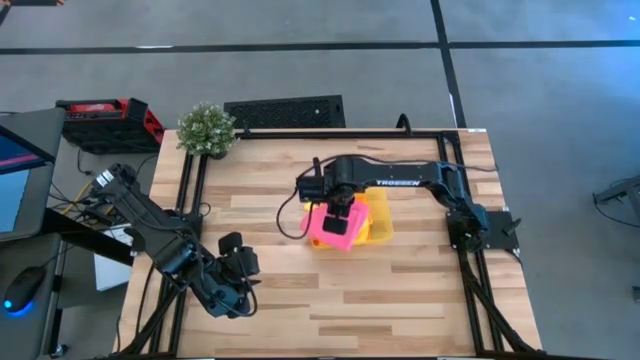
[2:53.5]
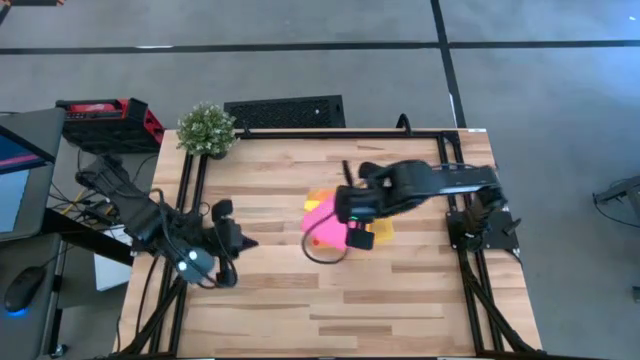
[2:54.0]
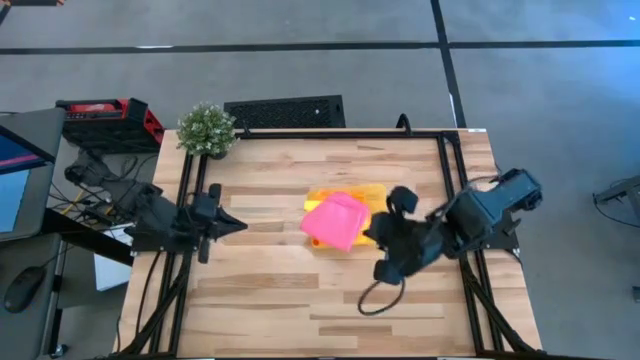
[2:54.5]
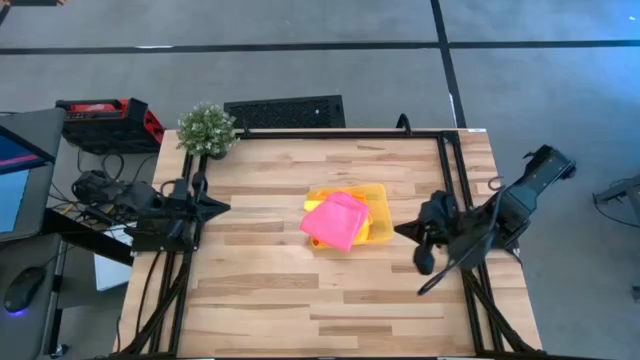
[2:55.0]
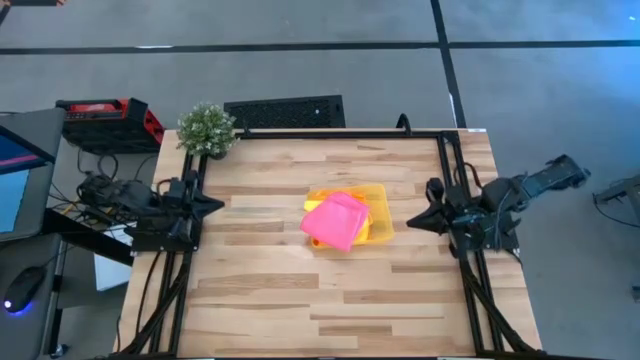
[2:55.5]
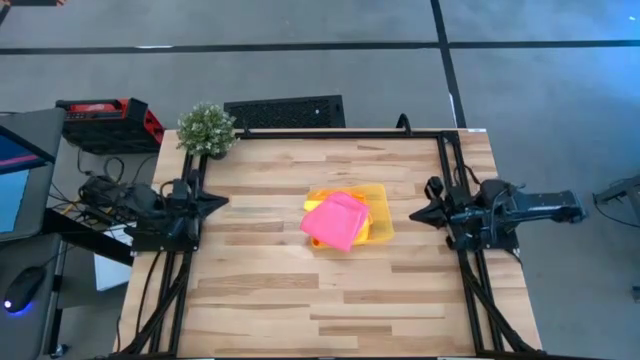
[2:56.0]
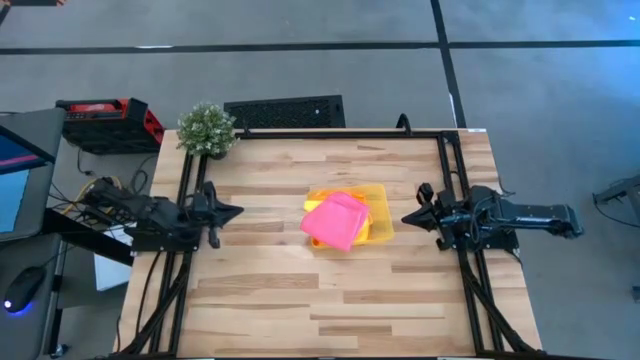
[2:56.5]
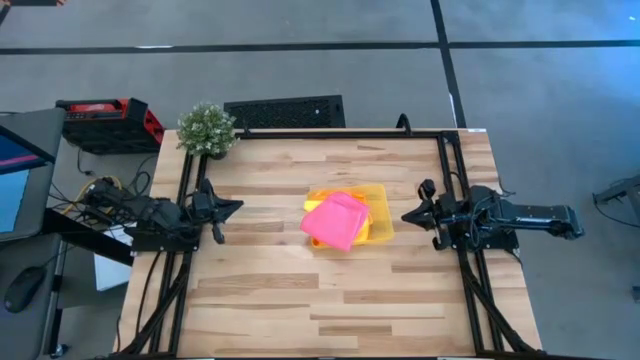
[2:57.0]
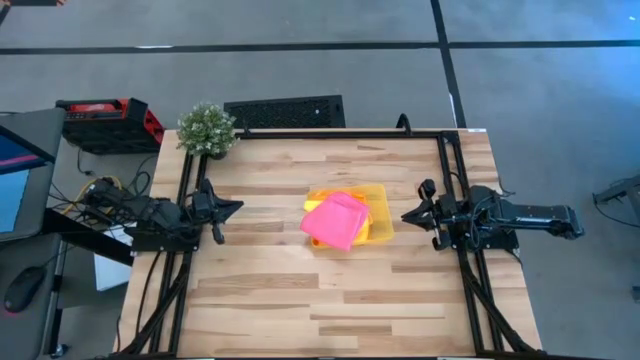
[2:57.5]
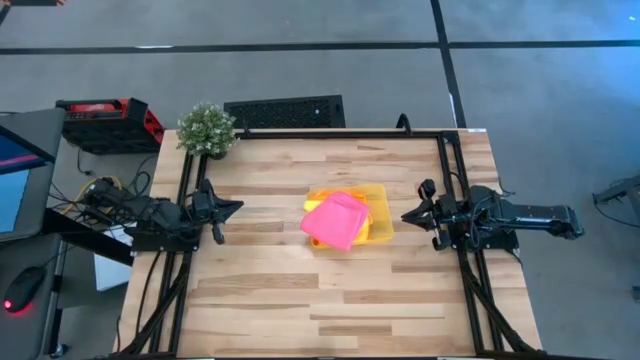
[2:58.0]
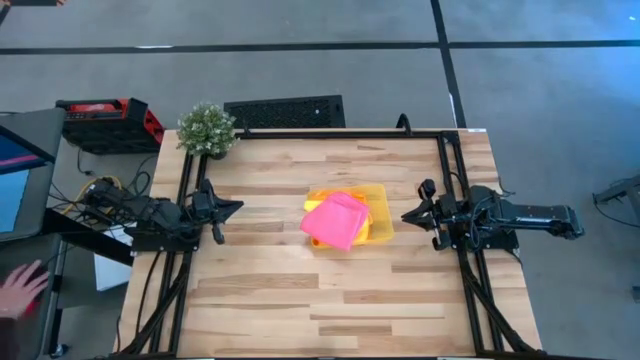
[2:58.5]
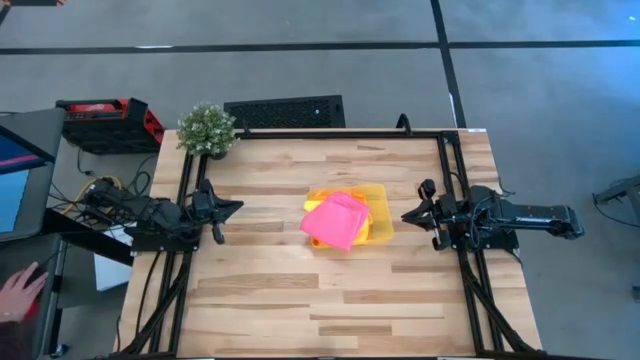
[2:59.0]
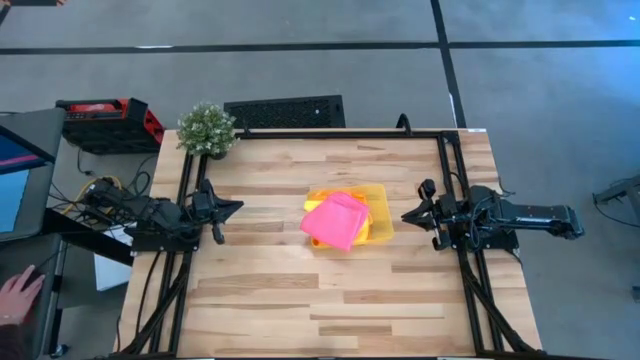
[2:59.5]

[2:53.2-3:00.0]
Task: Fold microfiber towels
Return to Home Position

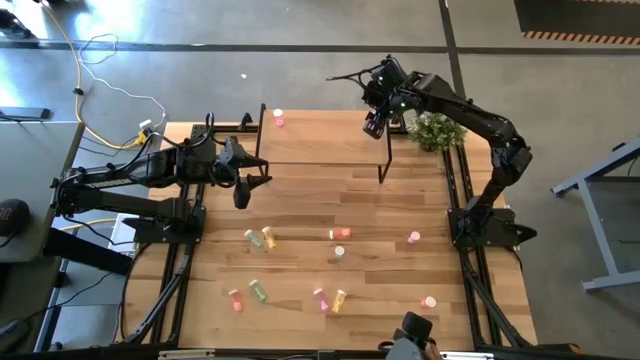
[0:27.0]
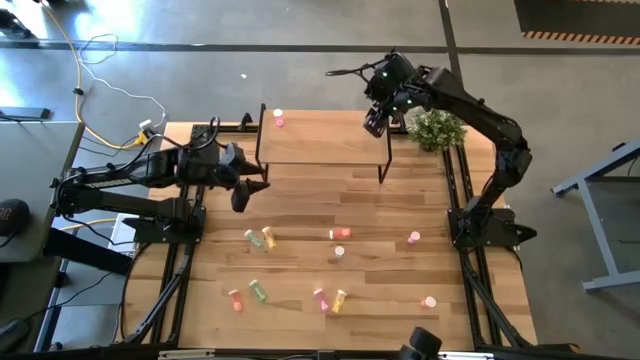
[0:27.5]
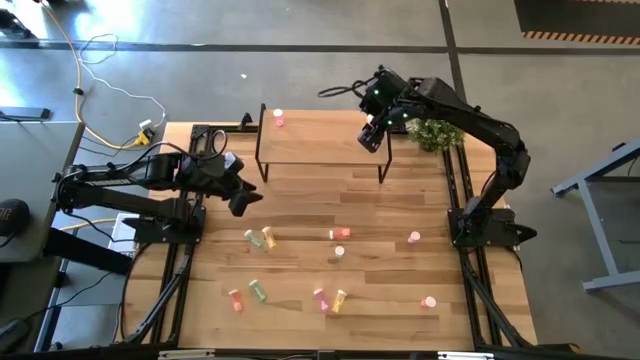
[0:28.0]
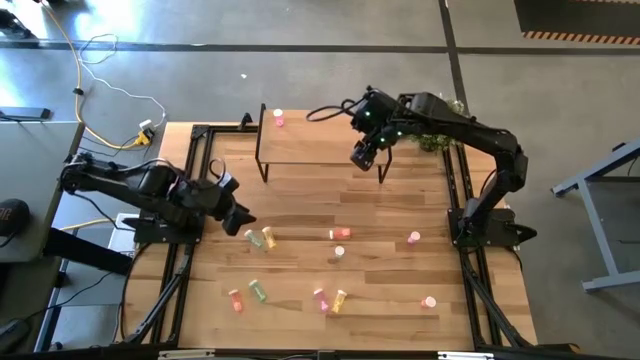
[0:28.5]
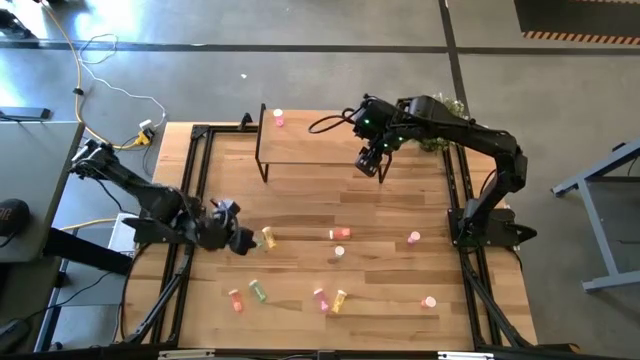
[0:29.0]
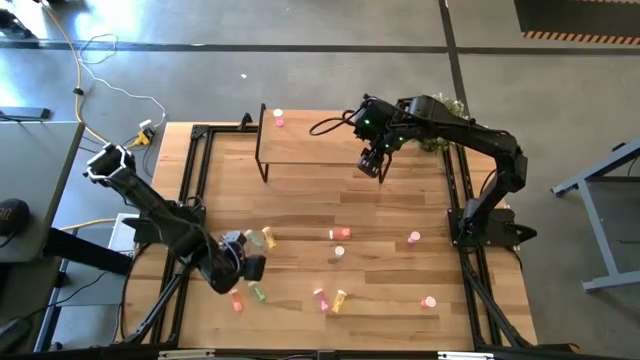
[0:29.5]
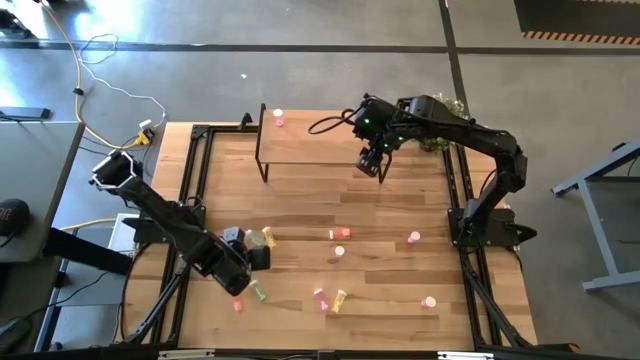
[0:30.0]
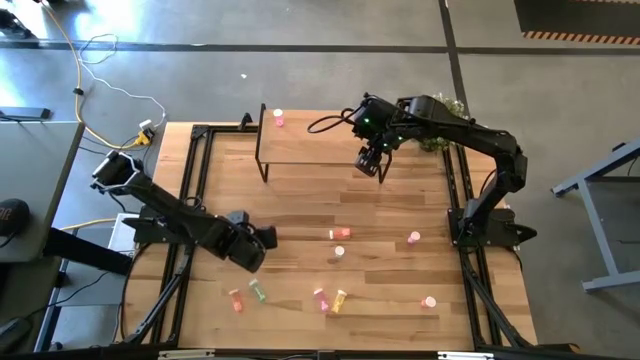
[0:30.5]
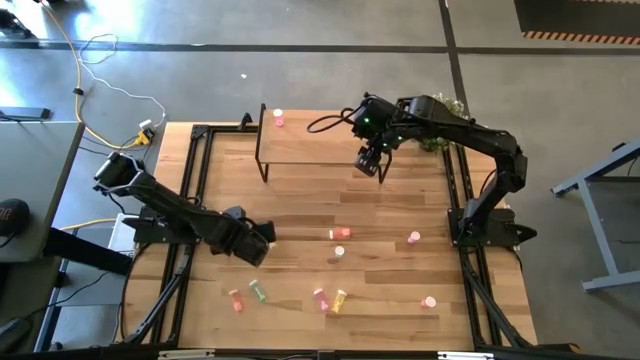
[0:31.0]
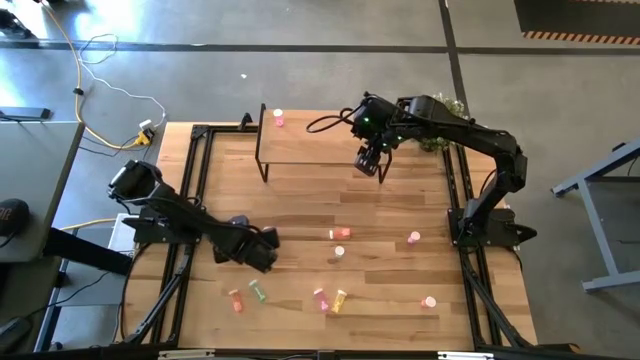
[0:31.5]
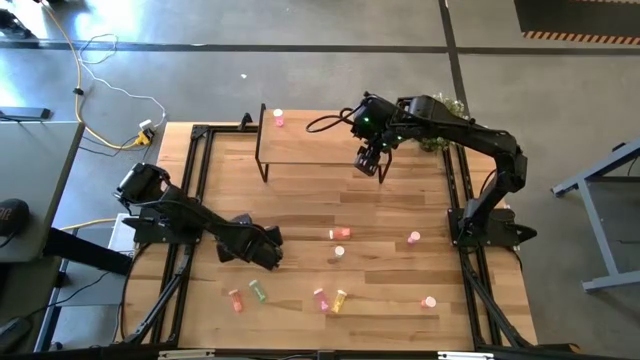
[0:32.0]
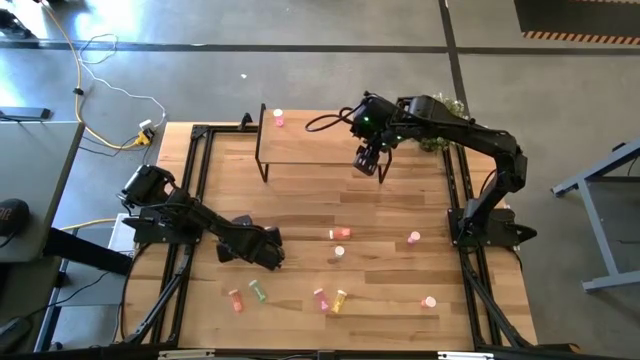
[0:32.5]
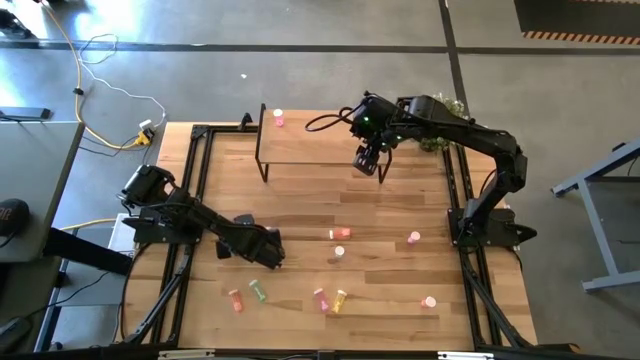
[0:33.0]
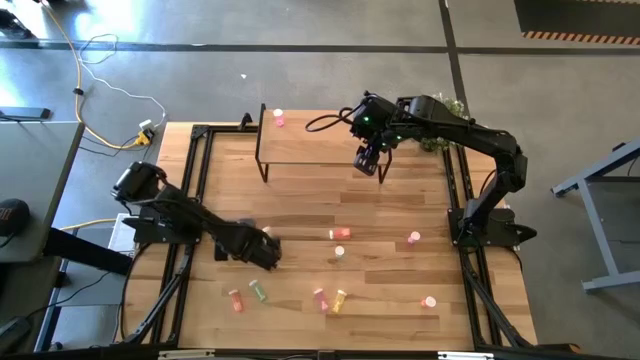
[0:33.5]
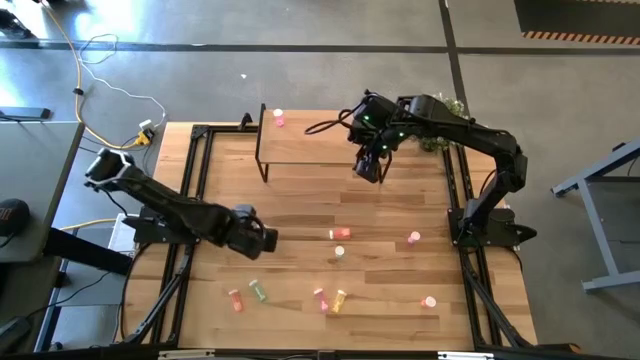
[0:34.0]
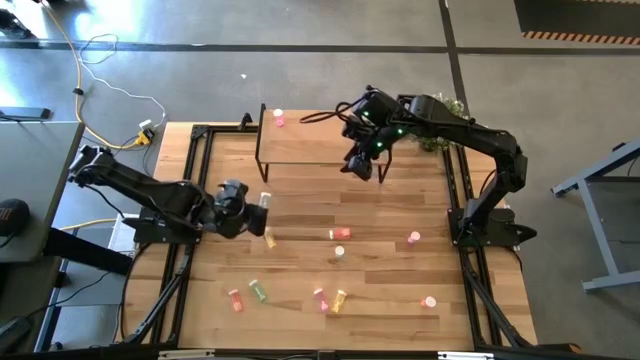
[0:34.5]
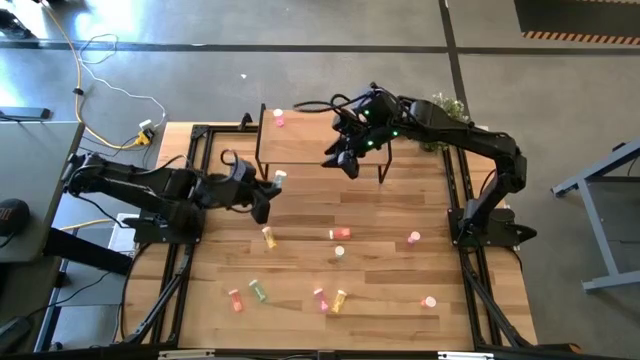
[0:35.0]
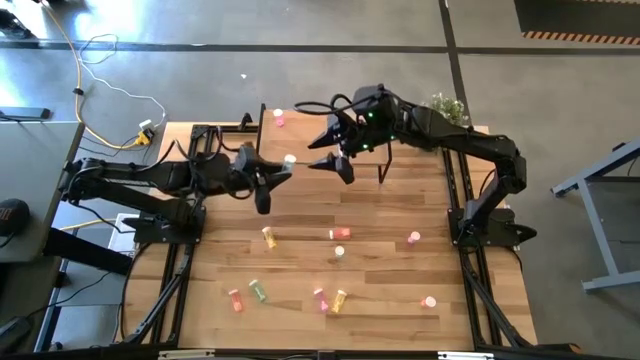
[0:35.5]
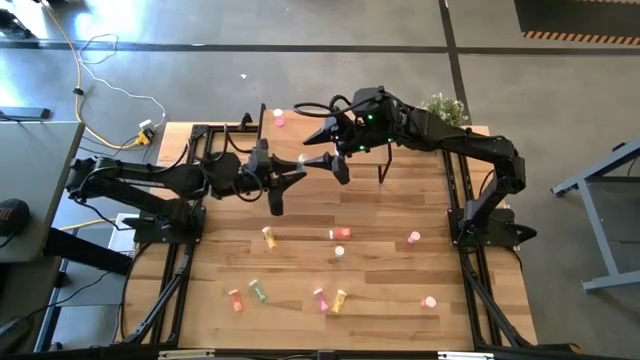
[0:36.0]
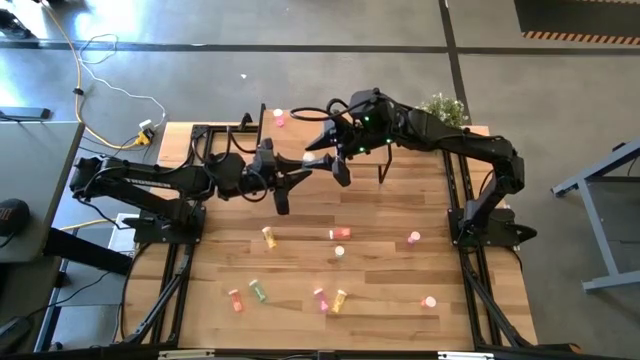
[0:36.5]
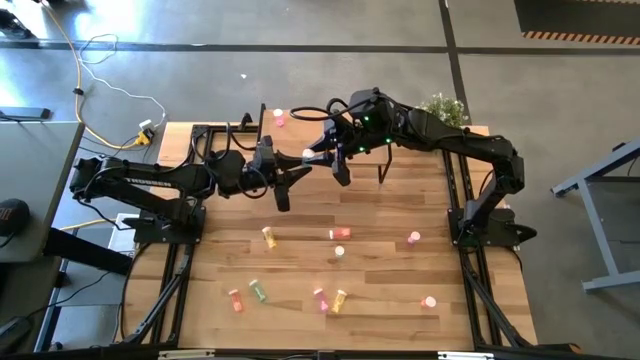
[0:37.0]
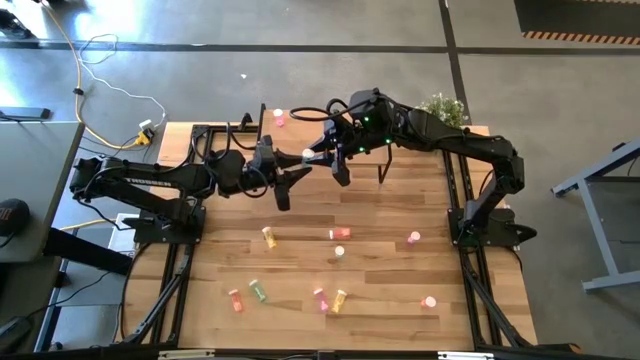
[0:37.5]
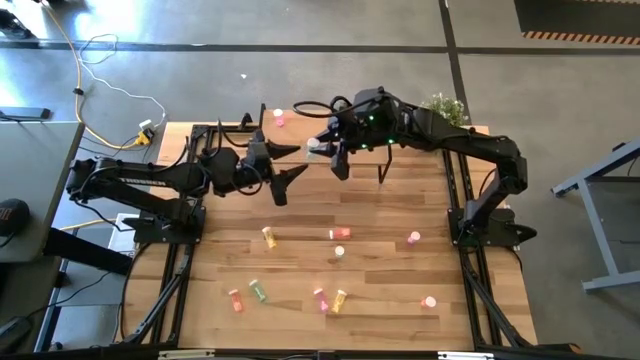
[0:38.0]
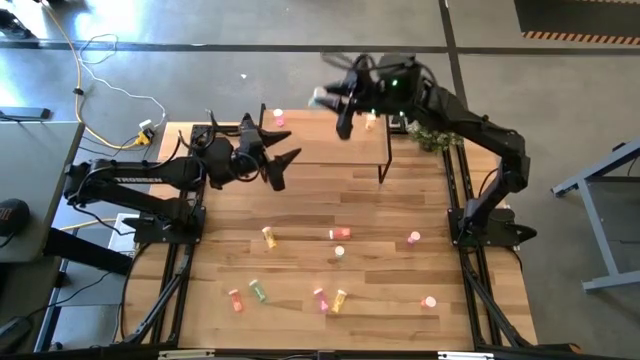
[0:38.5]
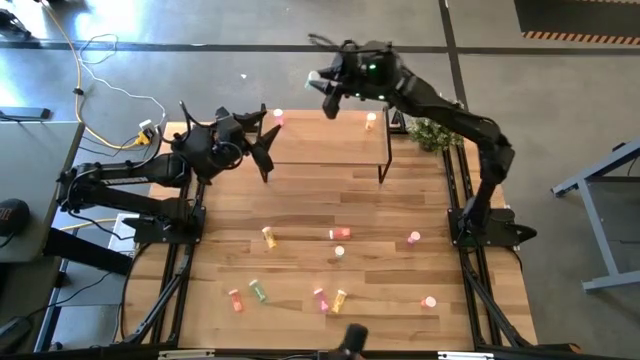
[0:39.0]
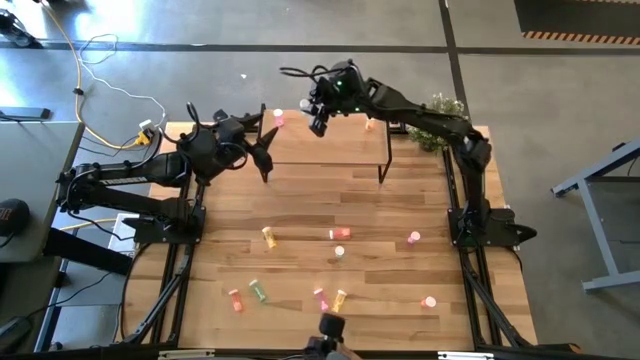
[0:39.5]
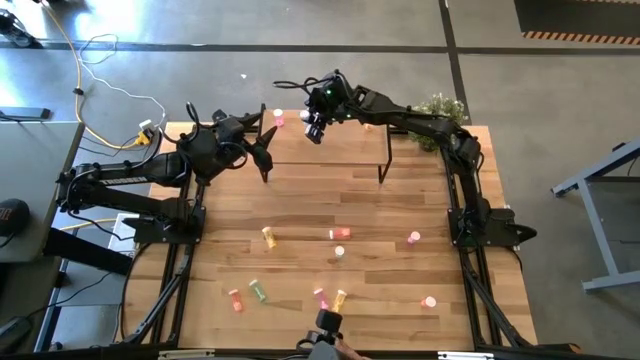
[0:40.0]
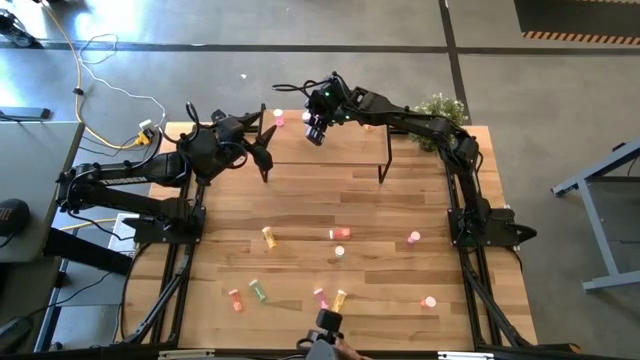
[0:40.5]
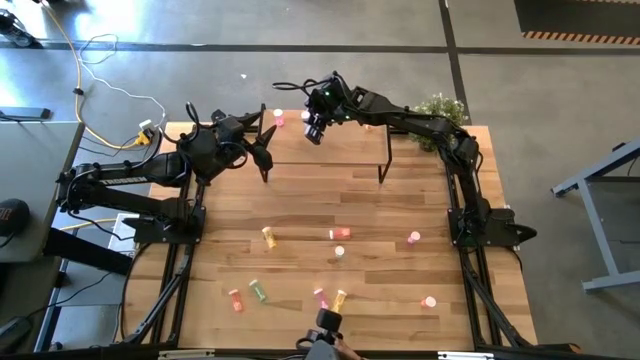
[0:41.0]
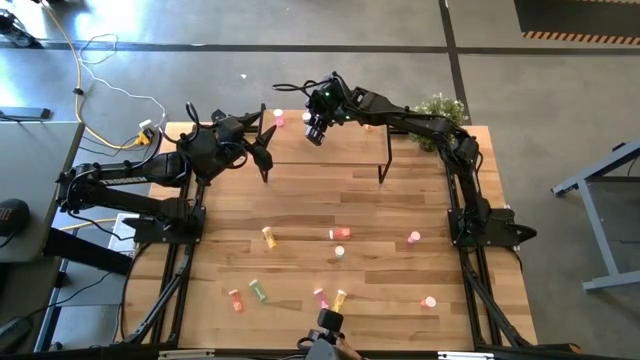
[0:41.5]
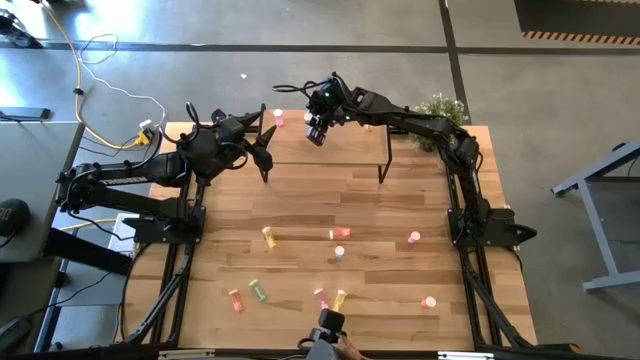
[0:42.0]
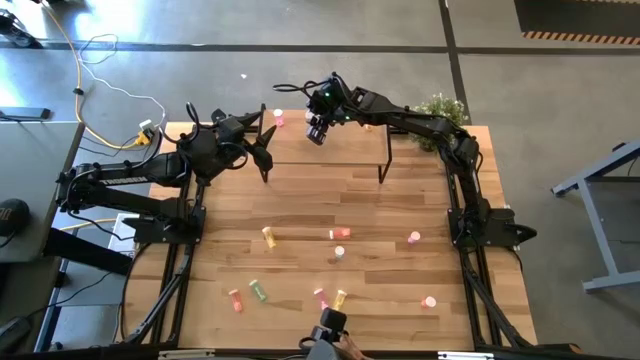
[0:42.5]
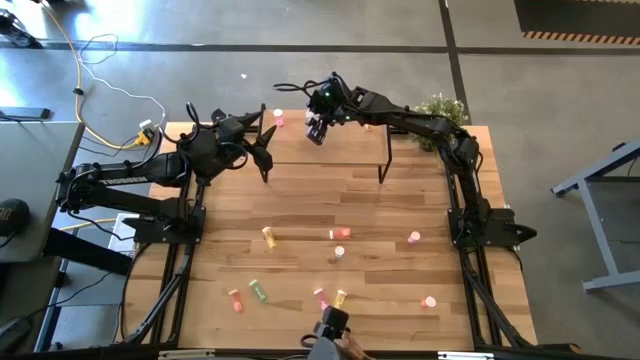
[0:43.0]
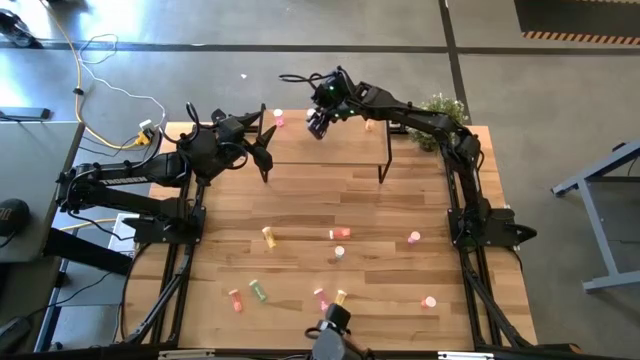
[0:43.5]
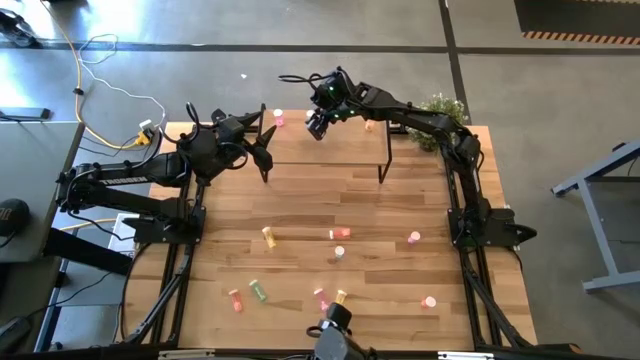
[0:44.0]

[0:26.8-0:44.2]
Task: Pick and place medicine bottles onto shelf by color
Put the top left blue pill bottle on the shelf
